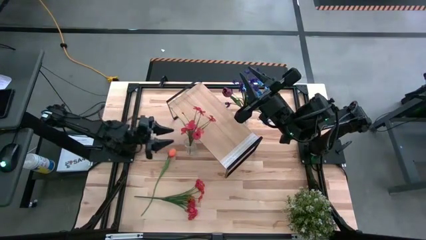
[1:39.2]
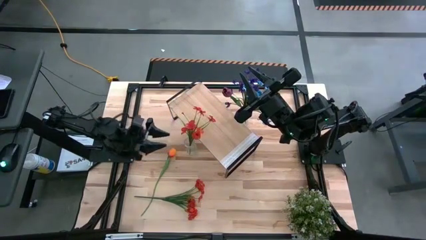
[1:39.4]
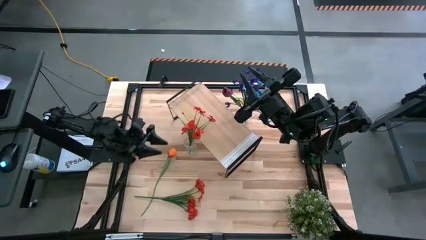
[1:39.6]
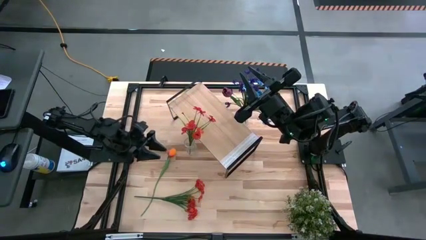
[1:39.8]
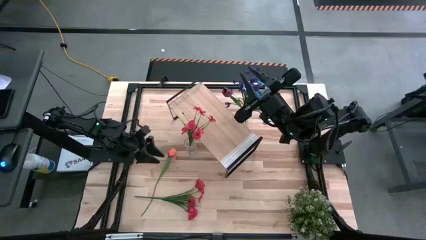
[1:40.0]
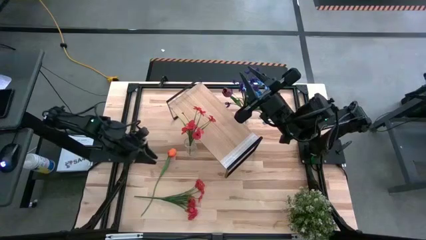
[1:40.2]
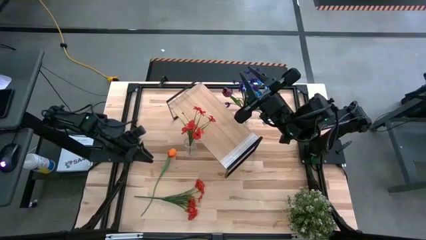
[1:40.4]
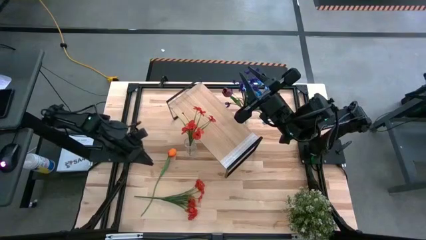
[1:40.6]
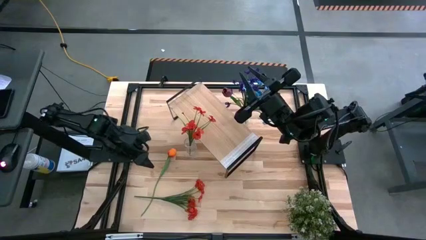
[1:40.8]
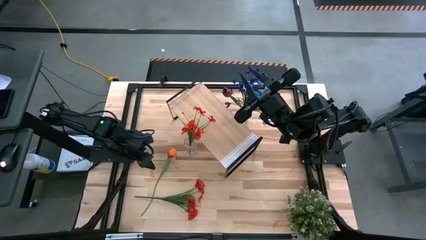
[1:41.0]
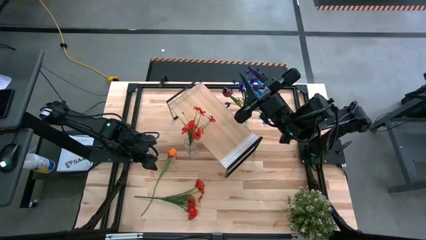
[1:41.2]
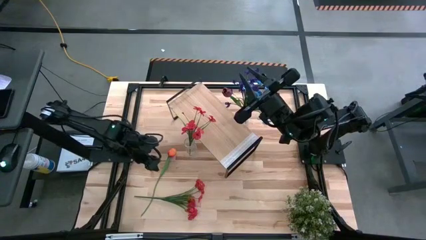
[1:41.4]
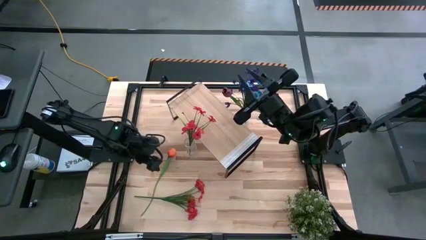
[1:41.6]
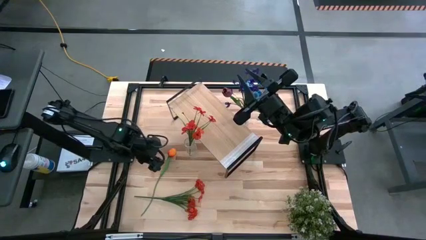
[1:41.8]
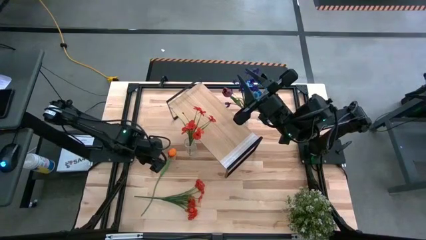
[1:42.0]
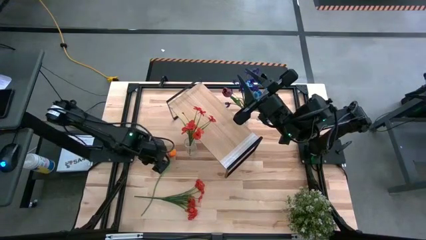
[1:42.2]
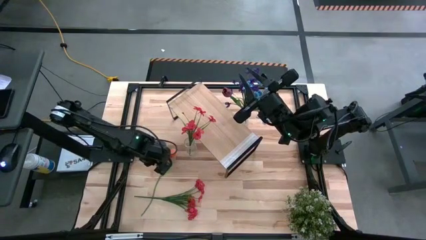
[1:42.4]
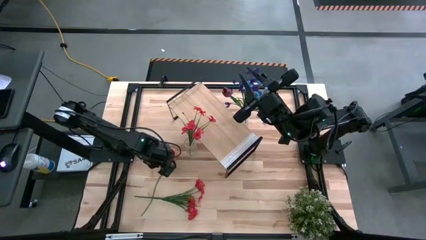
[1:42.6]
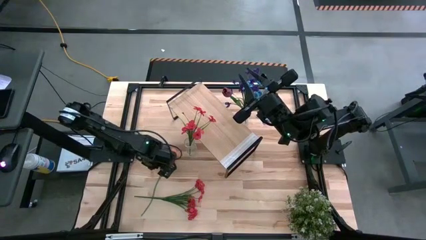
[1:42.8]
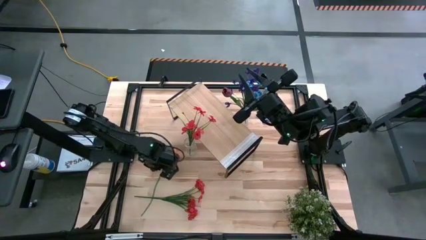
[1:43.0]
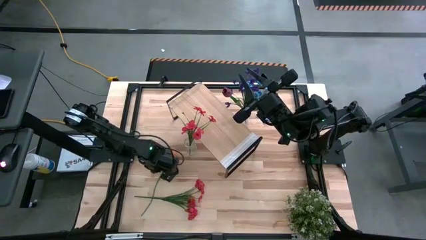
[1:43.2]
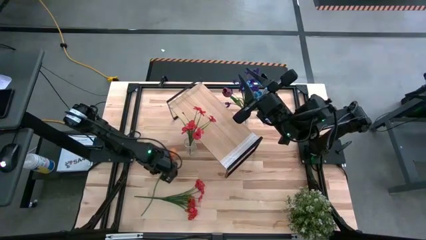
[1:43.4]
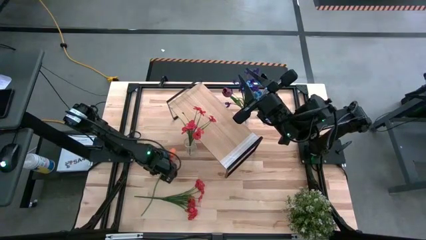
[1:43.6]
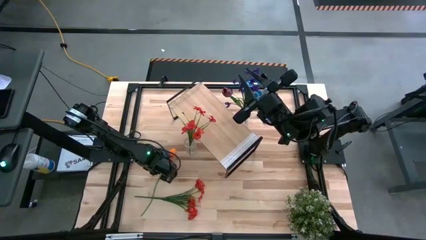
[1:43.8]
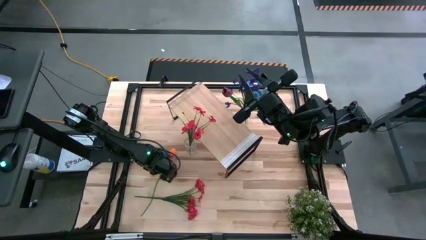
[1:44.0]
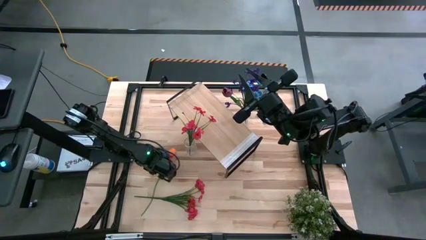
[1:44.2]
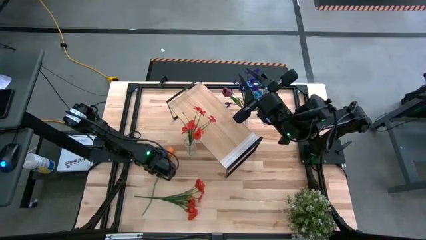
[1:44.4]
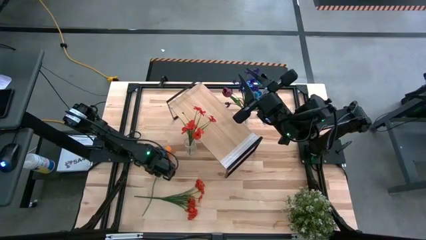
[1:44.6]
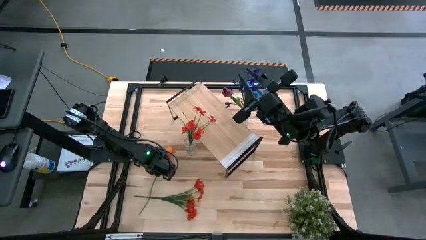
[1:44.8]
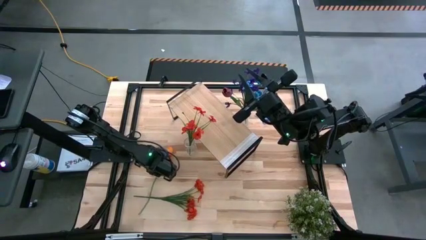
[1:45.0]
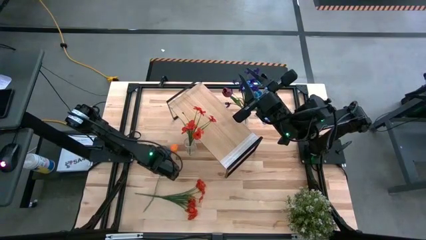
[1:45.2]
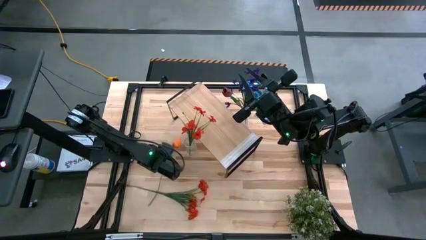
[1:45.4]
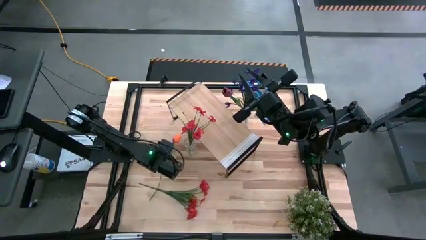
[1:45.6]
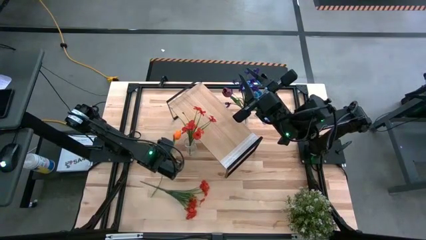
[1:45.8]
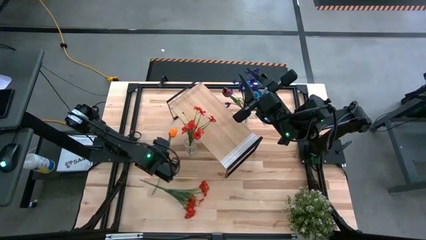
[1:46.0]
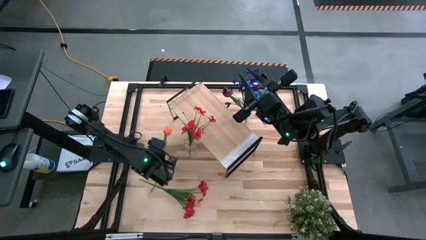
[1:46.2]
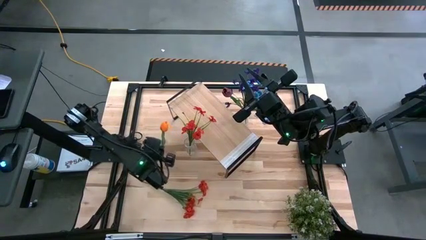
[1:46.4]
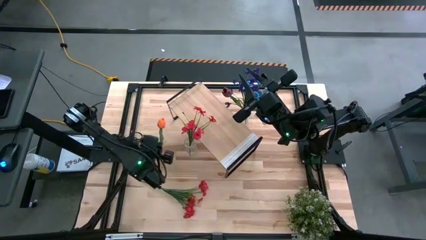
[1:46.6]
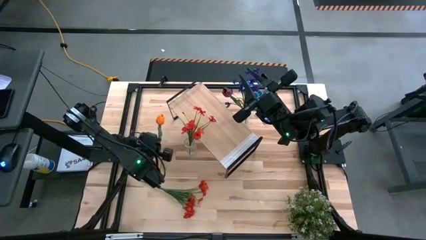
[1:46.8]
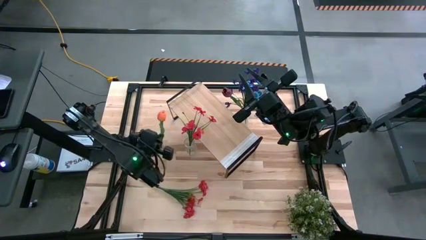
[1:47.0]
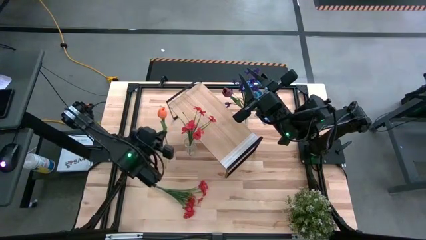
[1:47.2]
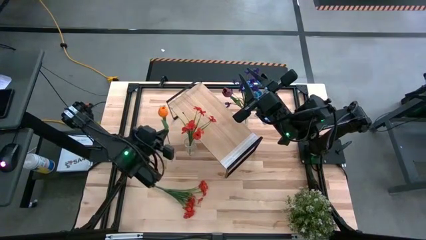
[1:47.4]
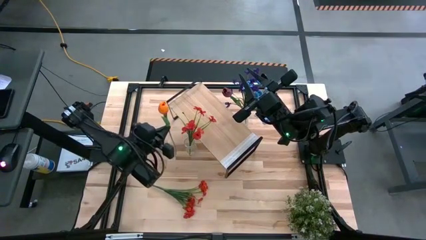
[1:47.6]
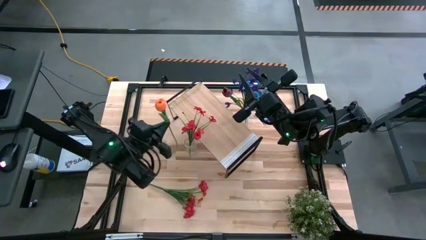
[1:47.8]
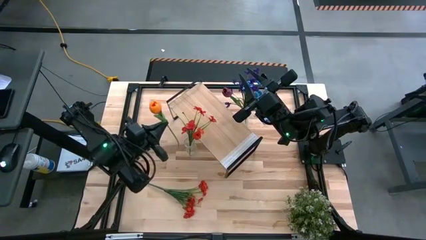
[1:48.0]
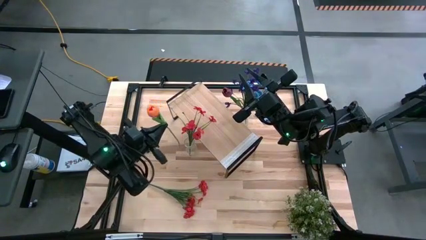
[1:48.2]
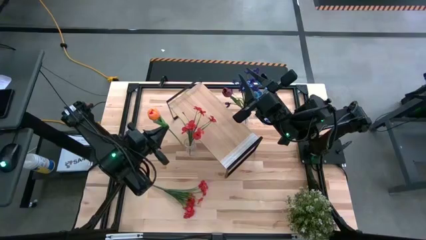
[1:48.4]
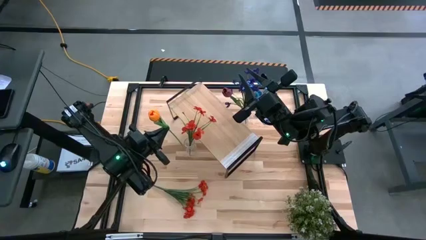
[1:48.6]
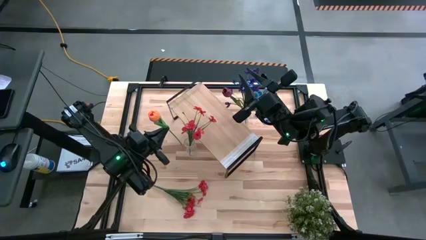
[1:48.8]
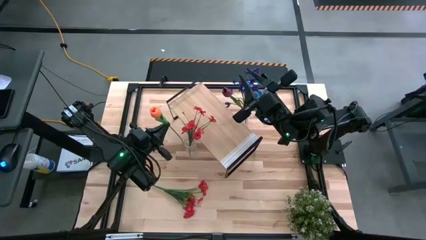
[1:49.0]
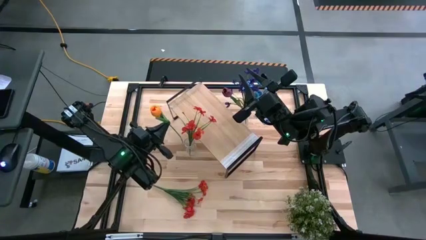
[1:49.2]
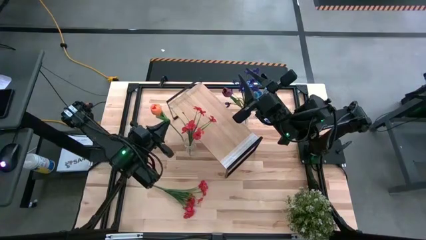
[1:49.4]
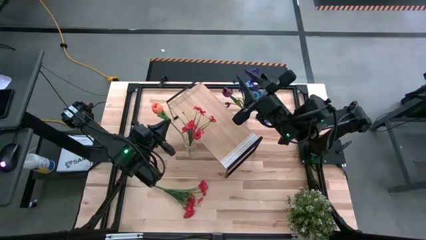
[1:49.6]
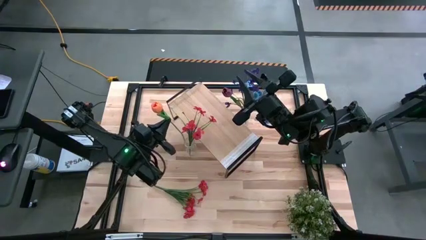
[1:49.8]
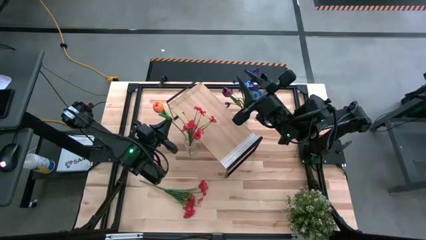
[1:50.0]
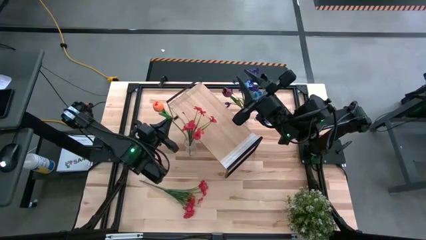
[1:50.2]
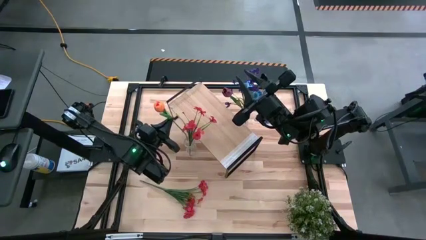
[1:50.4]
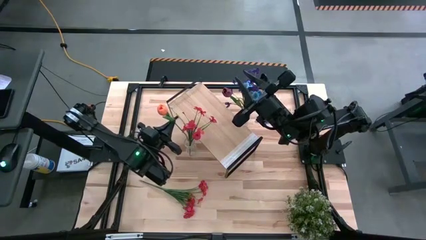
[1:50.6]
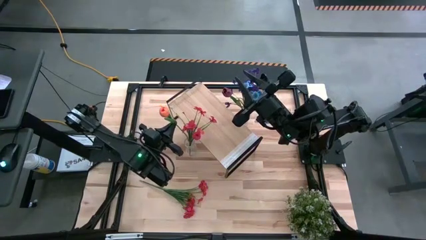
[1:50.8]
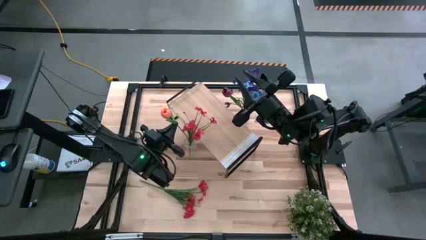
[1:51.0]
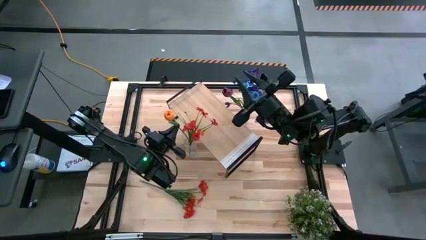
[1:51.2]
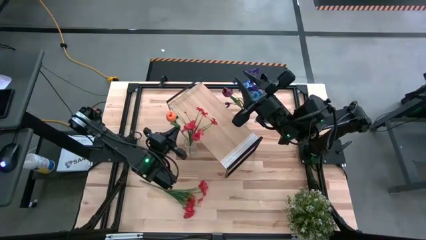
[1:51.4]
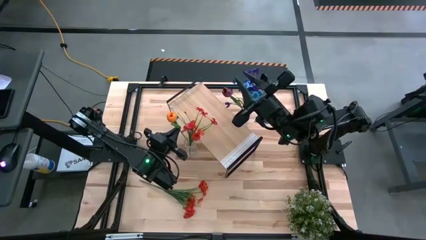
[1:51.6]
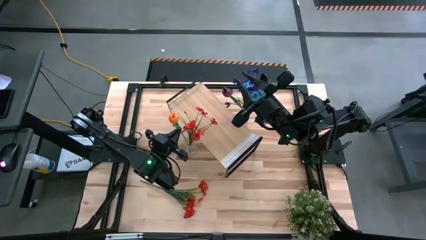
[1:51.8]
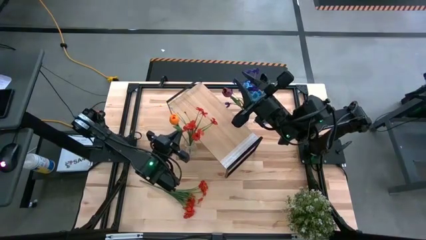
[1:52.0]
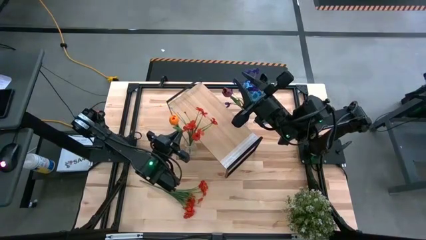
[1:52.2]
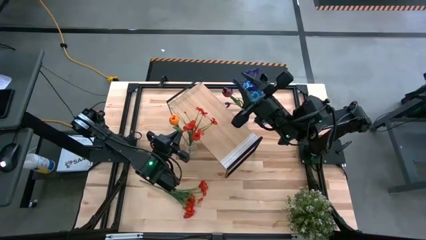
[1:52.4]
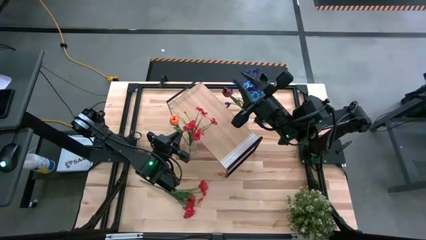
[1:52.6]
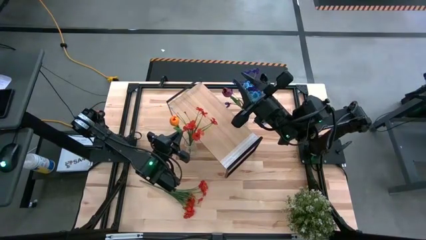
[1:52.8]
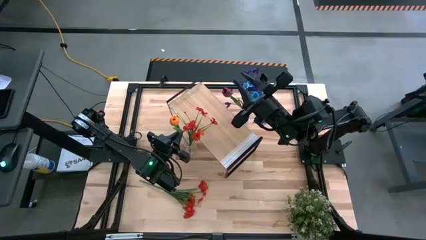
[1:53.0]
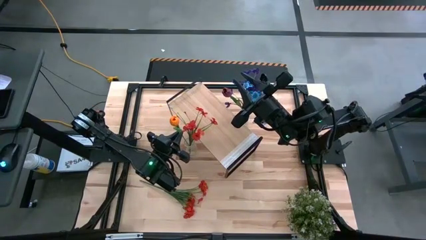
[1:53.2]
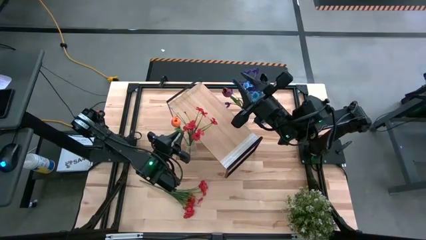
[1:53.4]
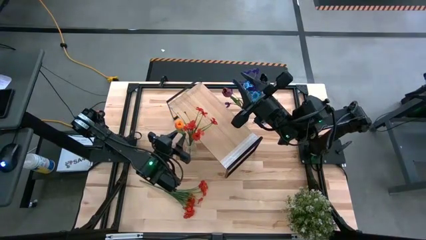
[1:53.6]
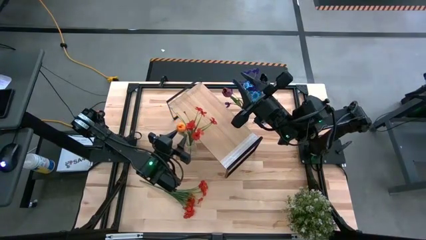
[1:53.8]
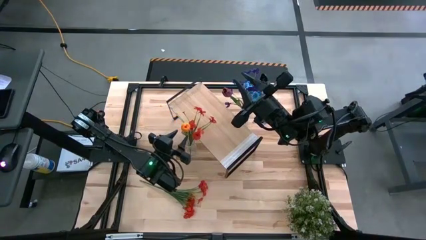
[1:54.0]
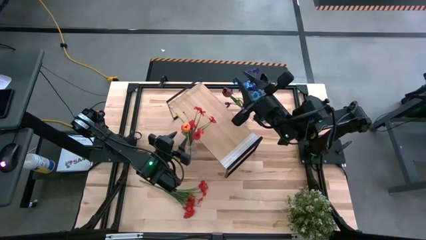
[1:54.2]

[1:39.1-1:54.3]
Task: Pick and place flowers into a vace then onto a shelf
Put the light orange flower into the bottom transparent vase
